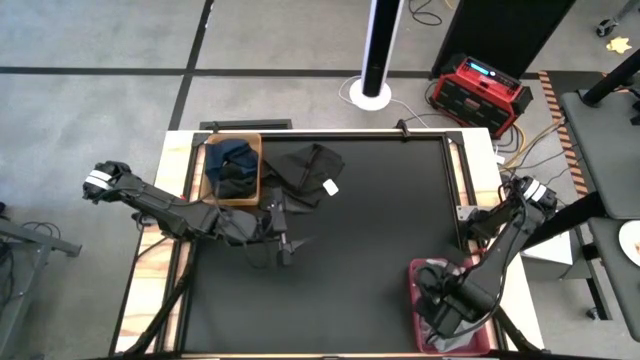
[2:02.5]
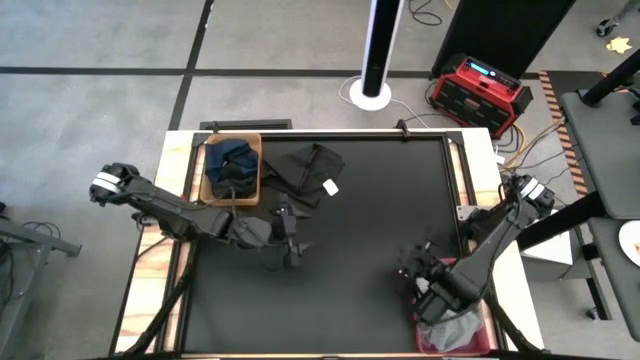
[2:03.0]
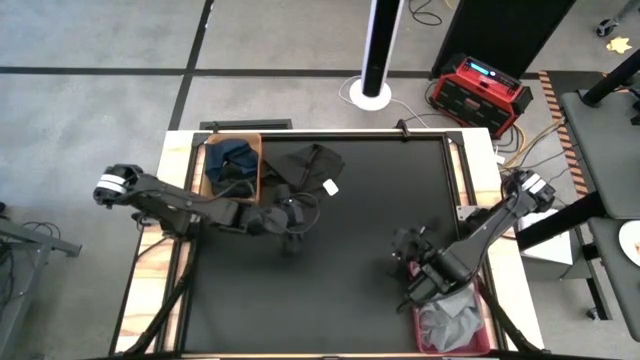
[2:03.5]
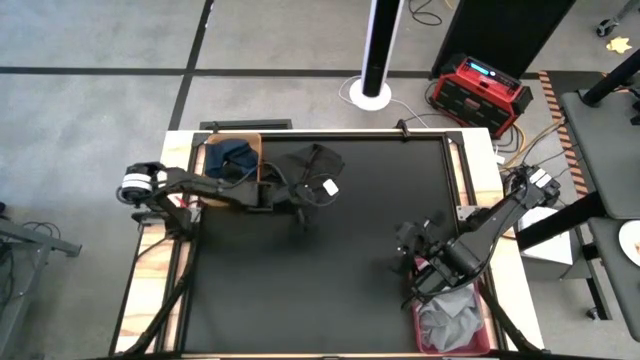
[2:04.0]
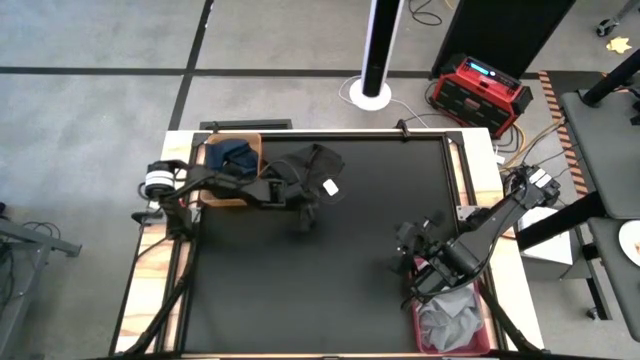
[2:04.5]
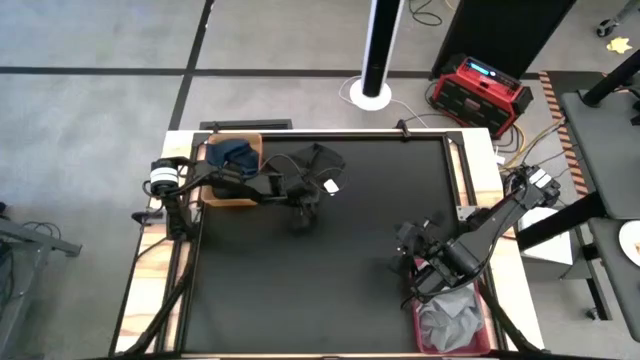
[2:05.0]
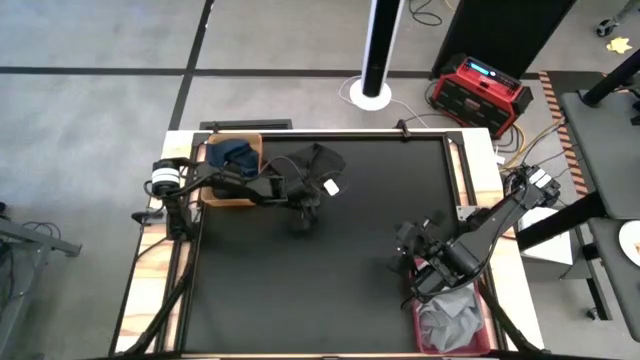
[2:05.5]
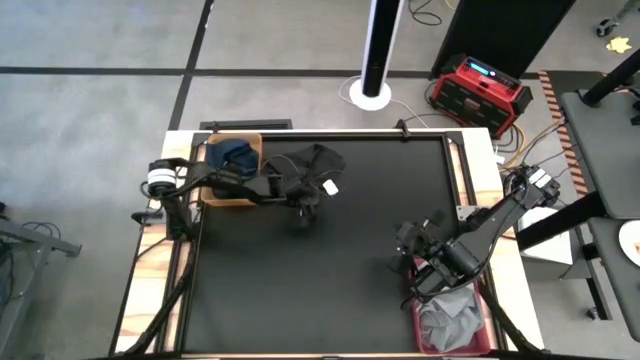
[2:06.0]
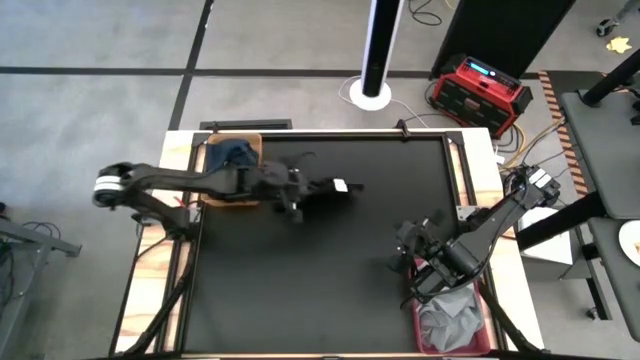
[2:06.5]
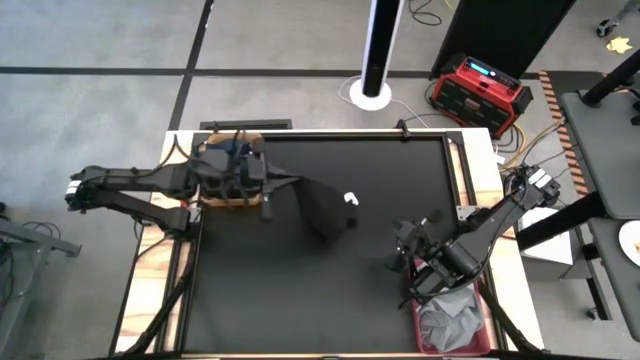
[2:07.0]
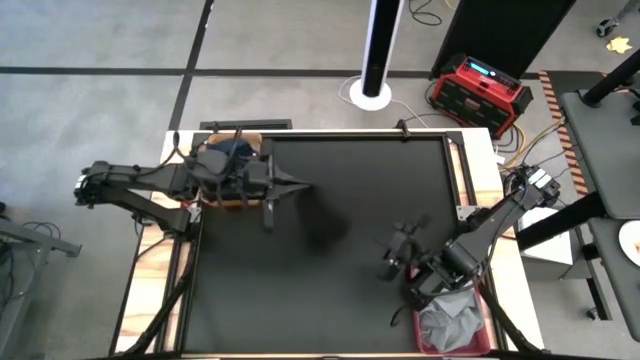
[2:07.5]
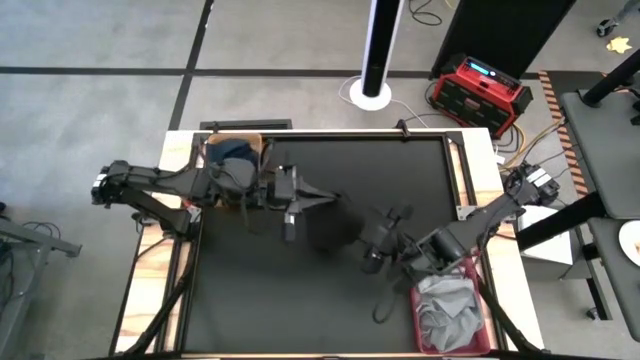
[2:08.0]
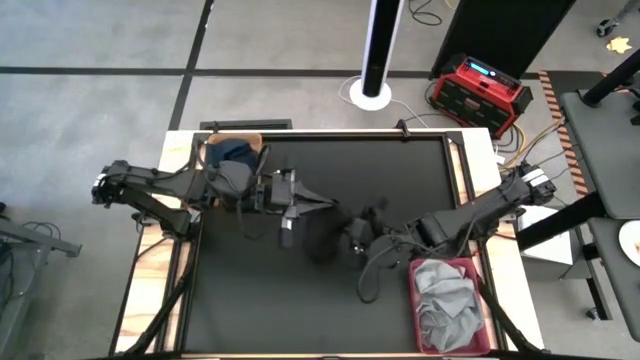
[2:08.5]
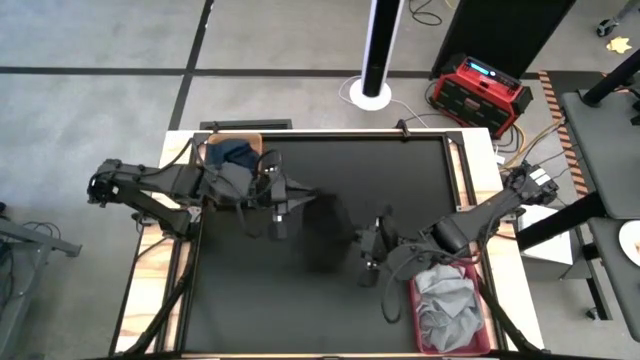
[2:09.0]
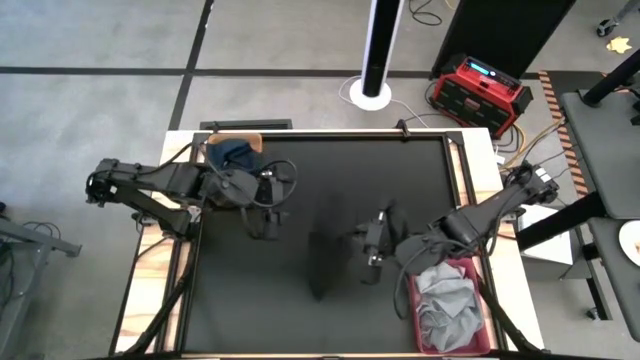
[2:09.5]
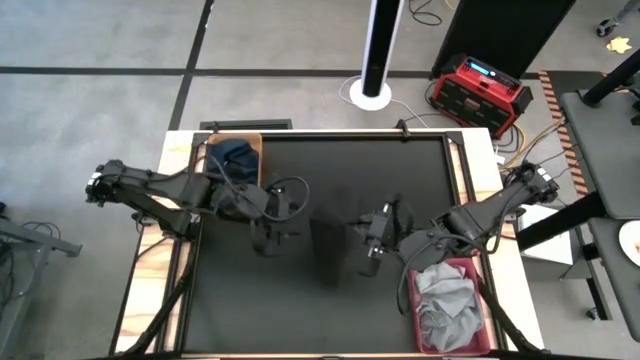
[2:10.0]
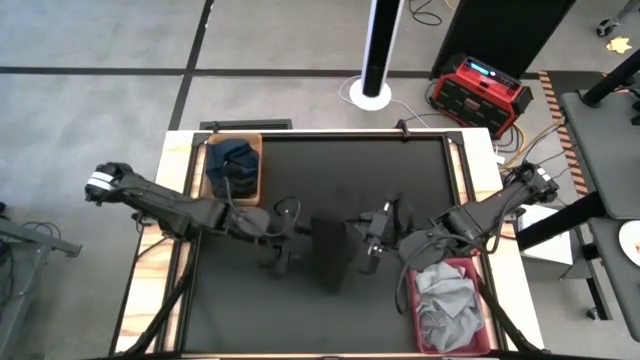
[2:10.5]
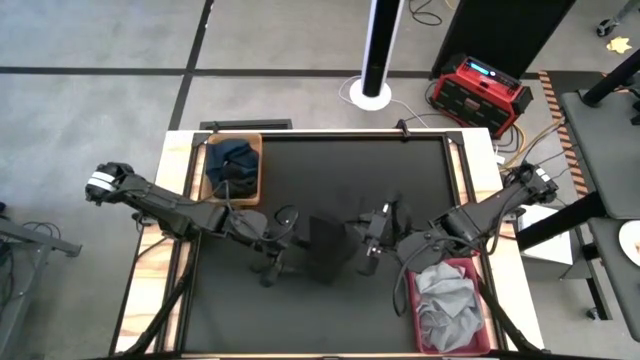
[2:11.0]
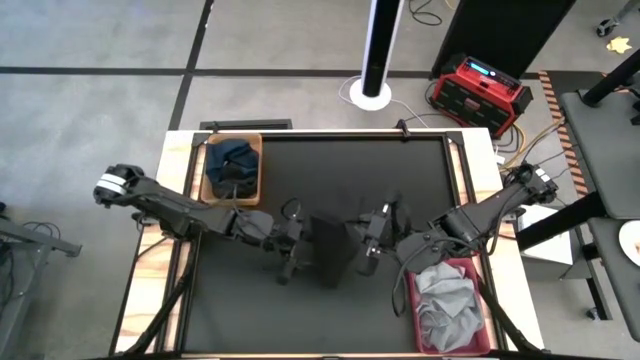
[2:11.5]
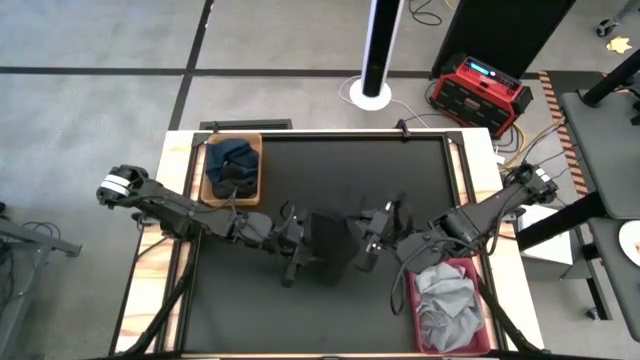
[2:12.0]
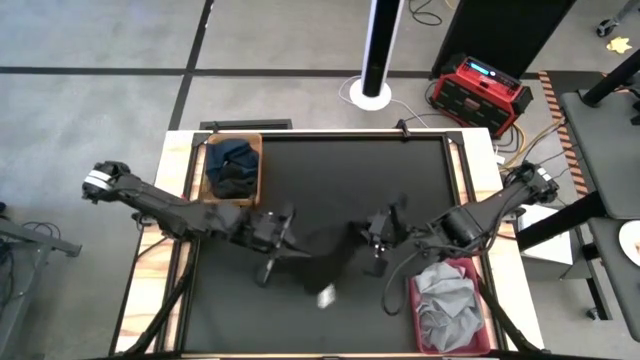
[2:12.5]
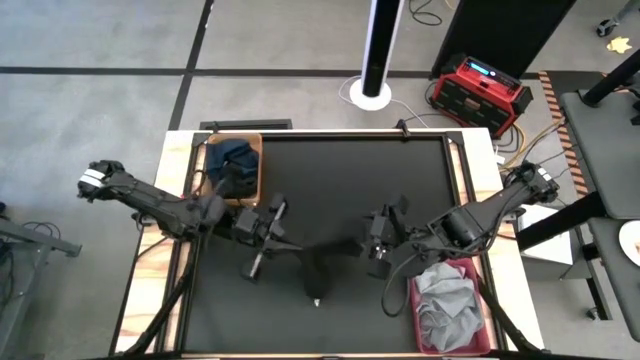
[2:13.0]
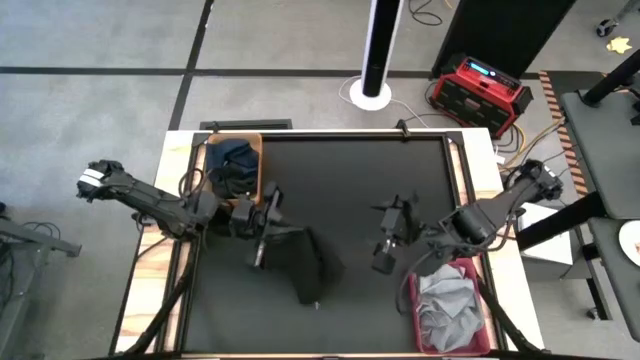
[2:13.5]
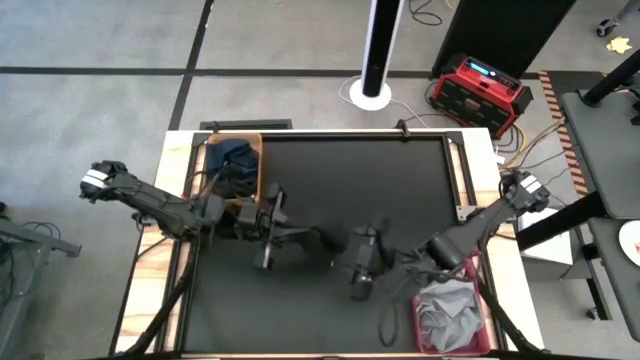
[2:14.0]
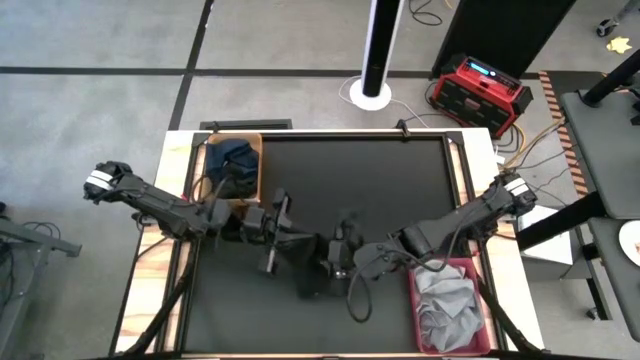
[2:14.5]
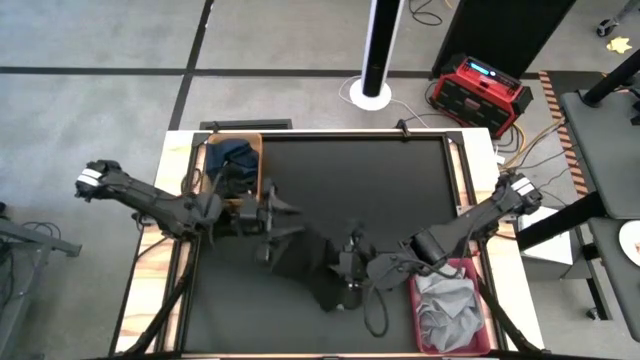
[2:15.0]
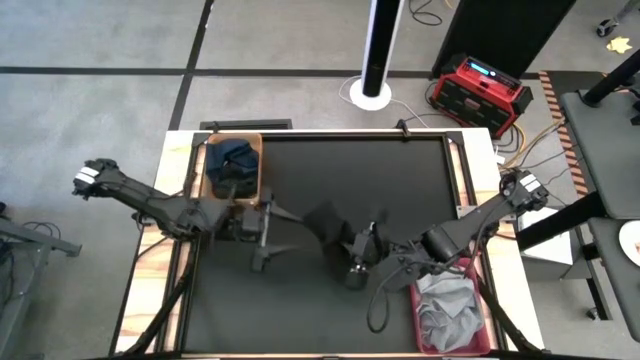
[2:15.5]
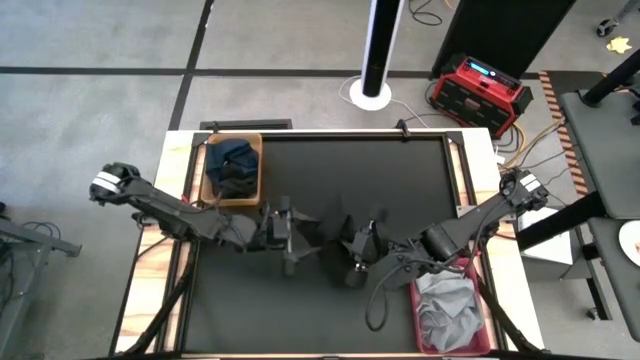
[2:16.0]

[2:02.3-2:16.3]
Task: Sort towels by color in basket
Put the black towel into the orange bin

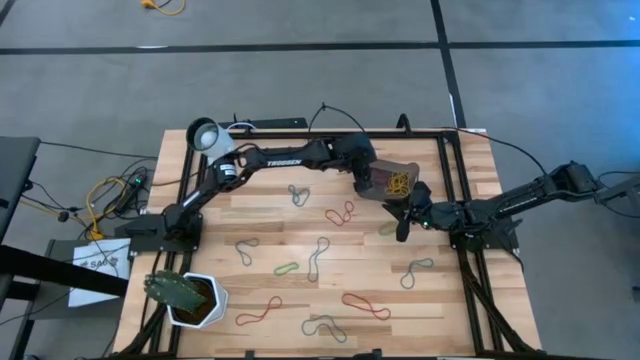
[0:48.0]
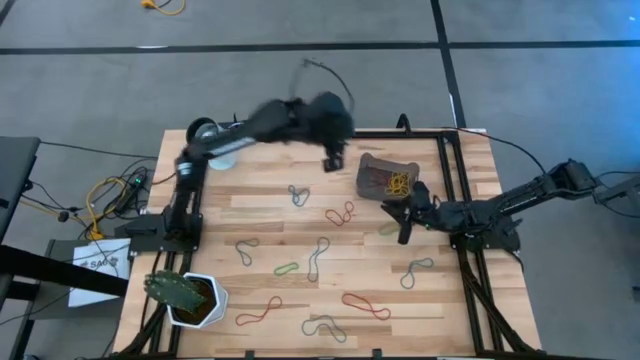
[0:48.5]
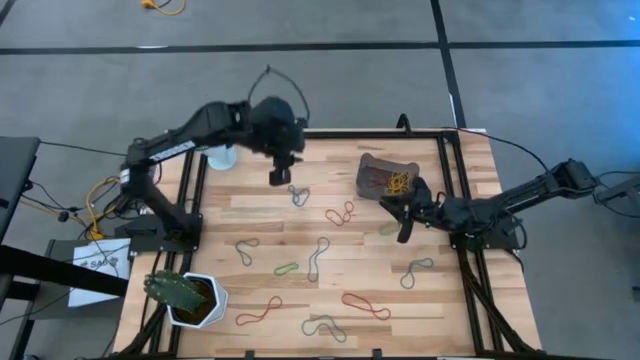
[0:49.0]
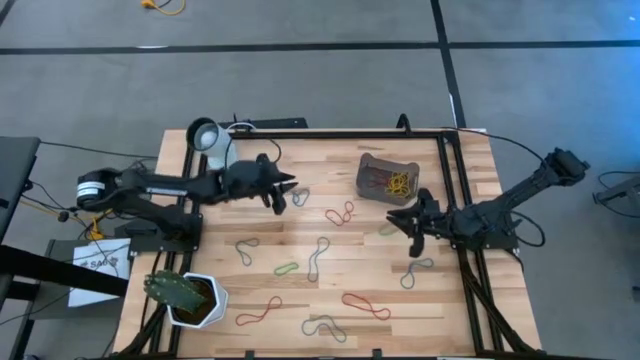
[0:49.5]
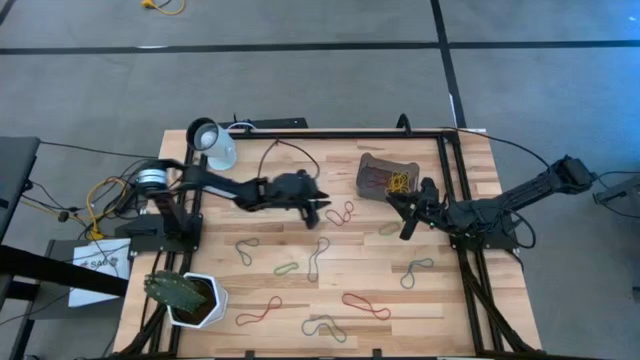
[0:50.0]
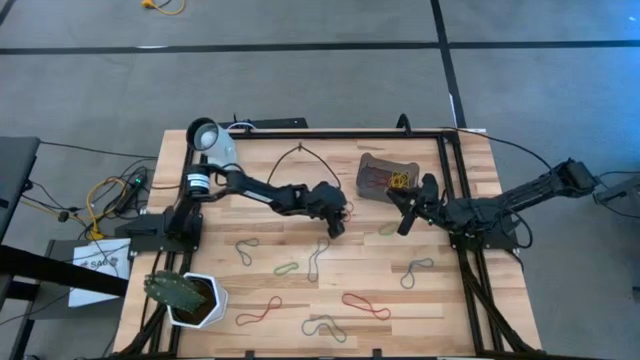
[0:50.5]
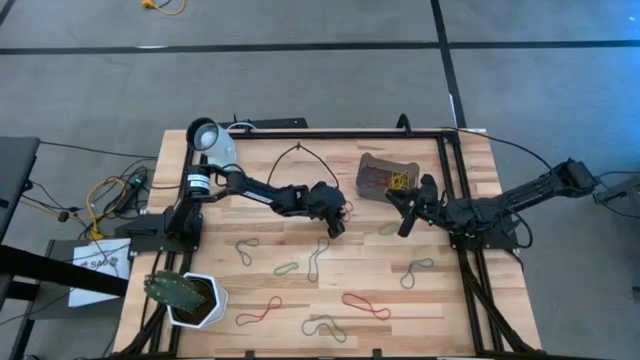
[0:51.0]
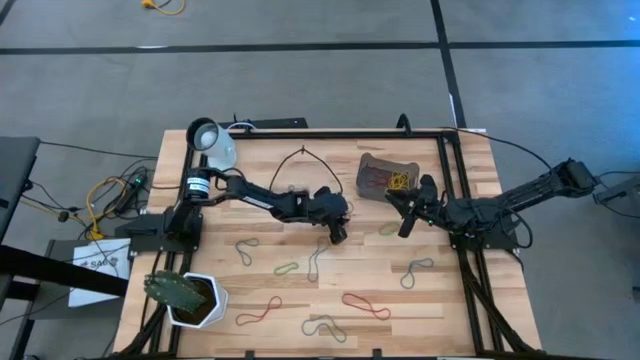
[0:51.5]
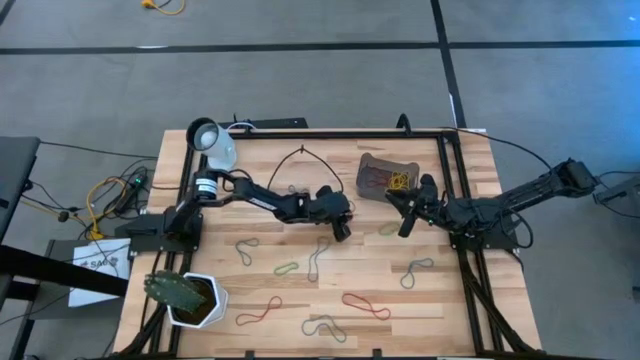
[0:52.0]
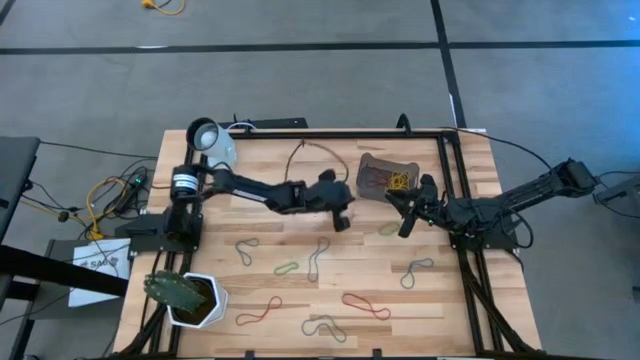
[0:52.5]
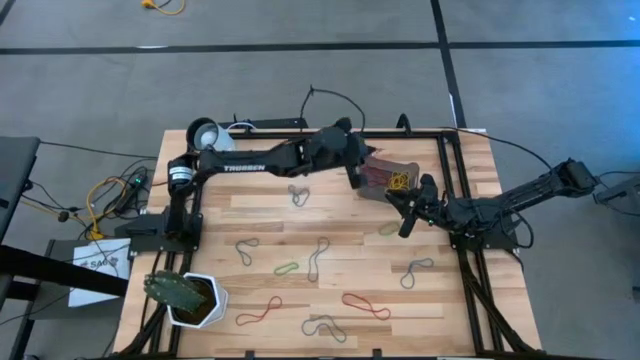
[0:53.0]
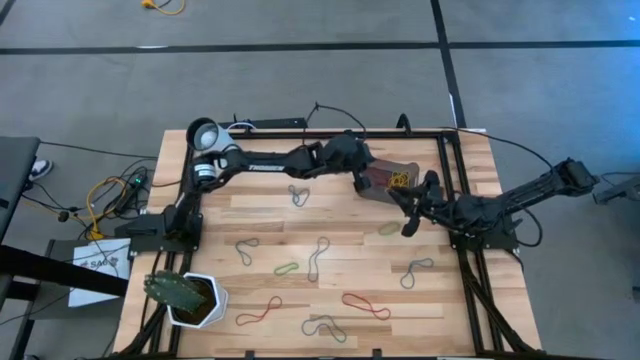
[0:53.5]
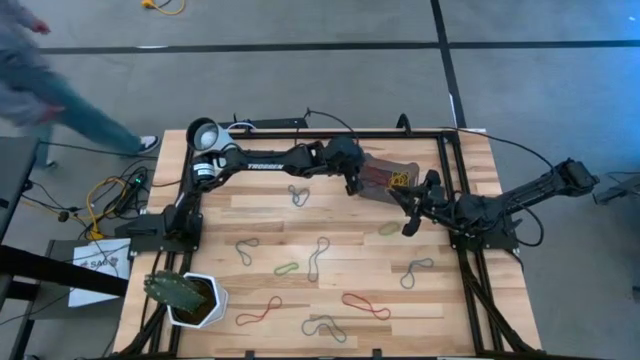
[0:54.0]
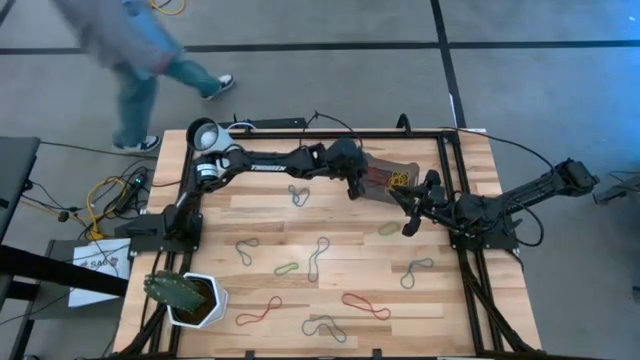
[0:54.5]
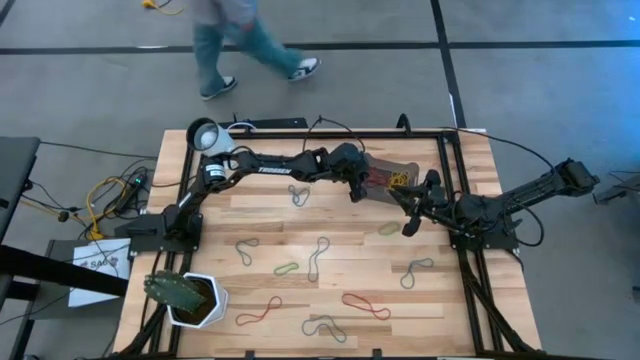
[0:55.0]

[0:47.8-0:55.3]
Task: Pick and place rubber bands into bin
Put the red rubber band into the black container
